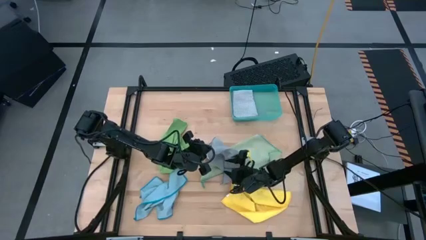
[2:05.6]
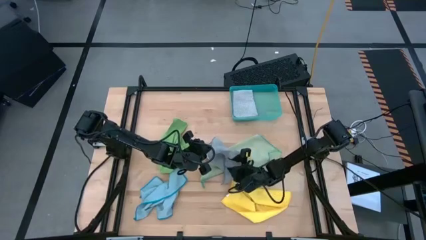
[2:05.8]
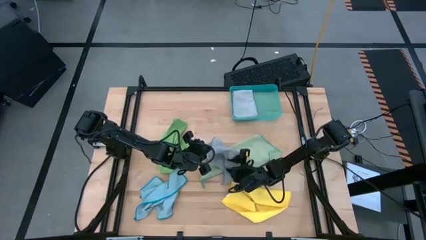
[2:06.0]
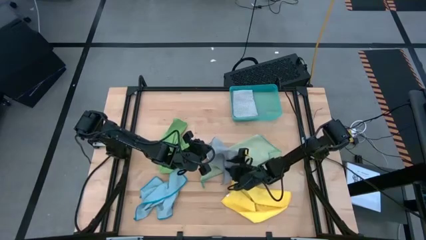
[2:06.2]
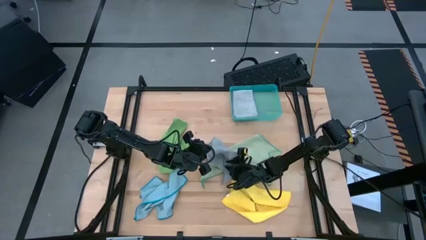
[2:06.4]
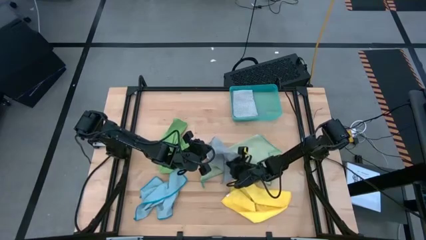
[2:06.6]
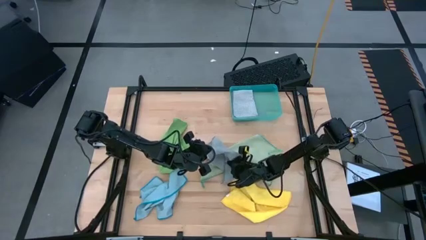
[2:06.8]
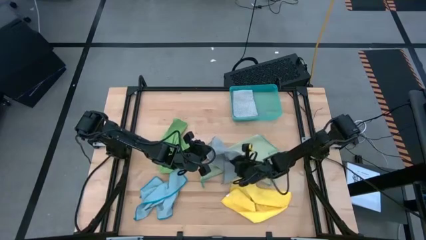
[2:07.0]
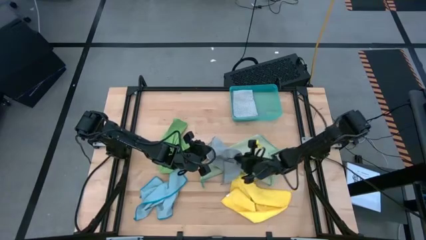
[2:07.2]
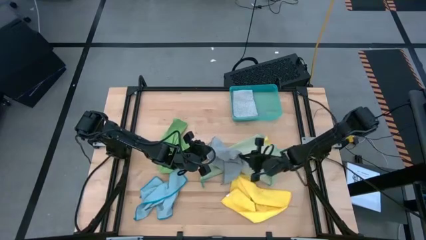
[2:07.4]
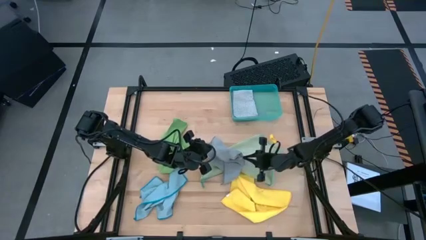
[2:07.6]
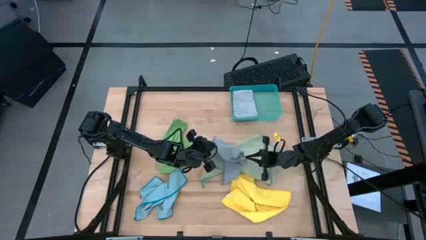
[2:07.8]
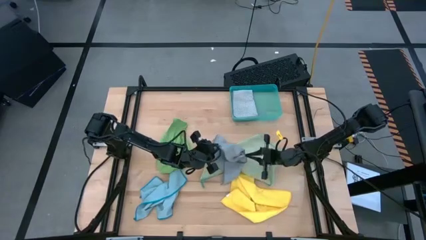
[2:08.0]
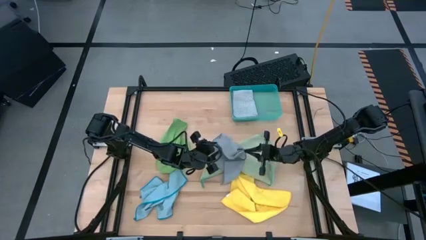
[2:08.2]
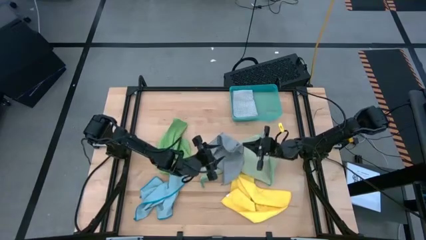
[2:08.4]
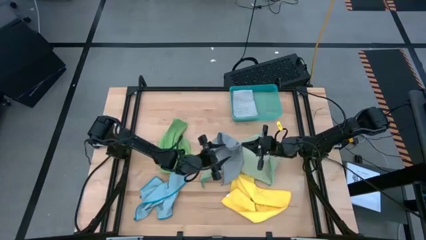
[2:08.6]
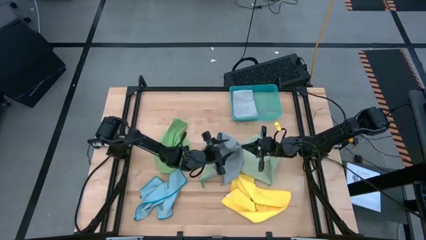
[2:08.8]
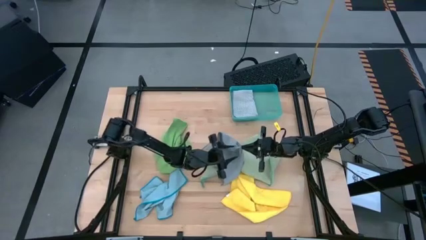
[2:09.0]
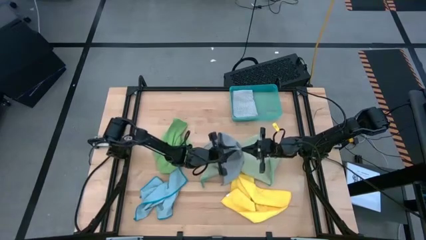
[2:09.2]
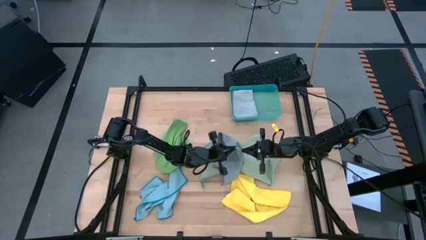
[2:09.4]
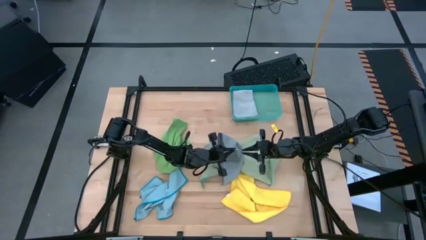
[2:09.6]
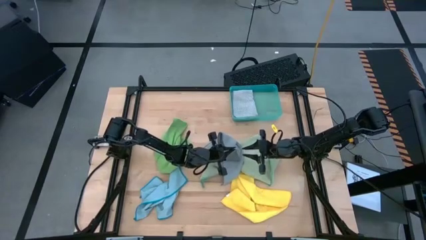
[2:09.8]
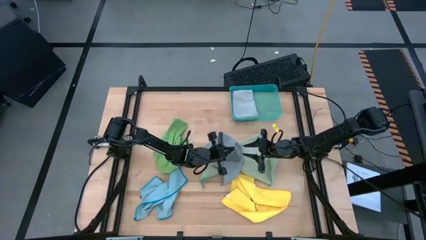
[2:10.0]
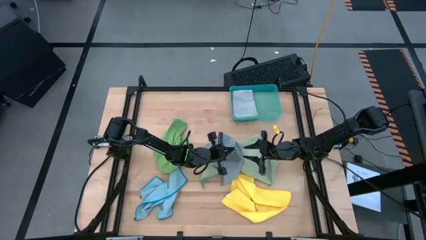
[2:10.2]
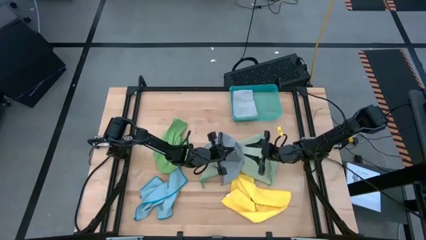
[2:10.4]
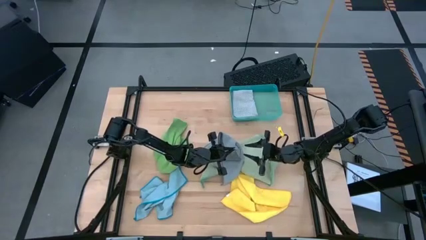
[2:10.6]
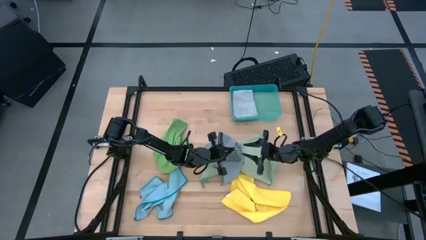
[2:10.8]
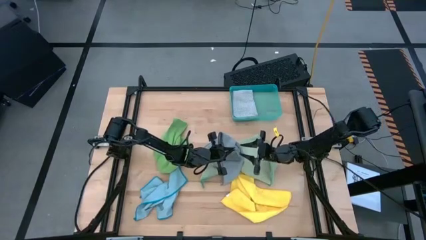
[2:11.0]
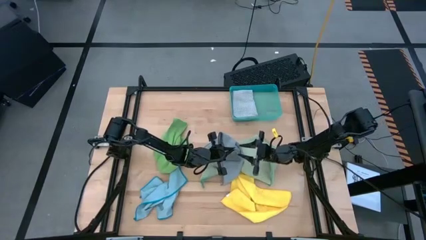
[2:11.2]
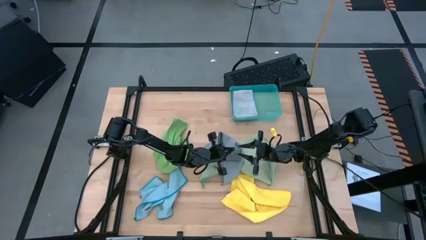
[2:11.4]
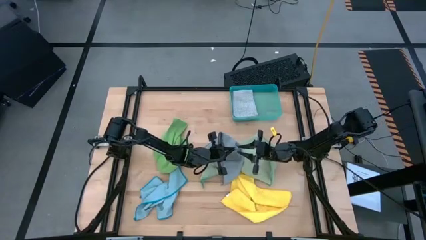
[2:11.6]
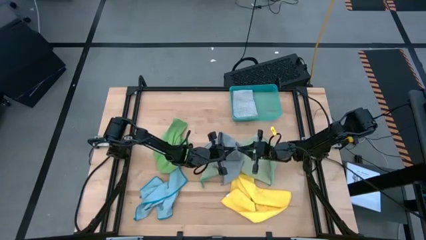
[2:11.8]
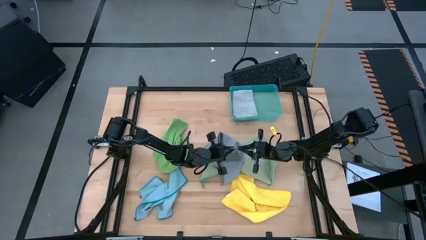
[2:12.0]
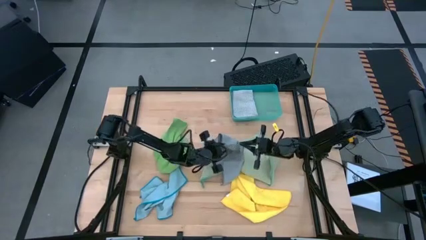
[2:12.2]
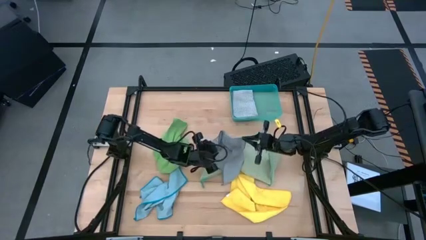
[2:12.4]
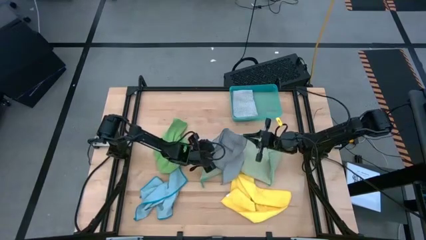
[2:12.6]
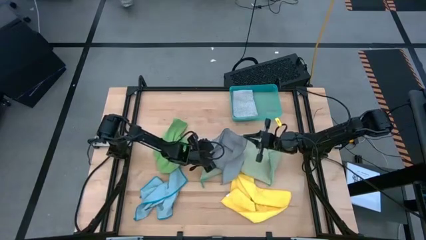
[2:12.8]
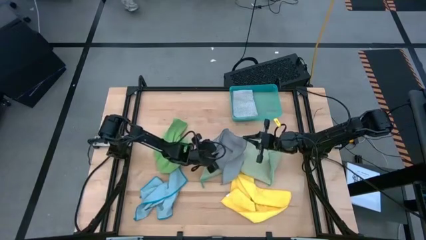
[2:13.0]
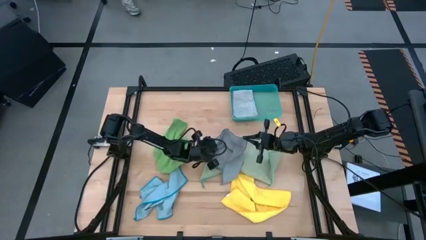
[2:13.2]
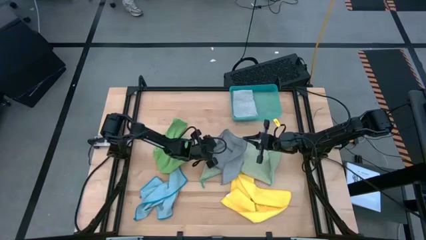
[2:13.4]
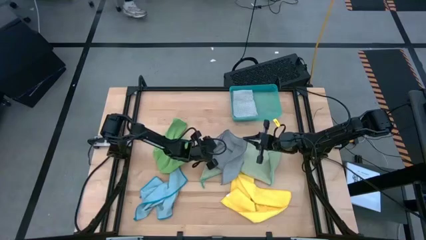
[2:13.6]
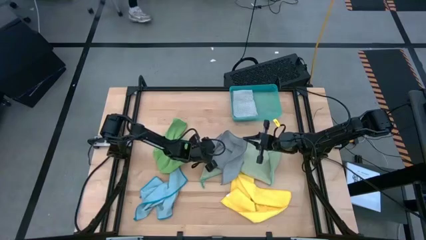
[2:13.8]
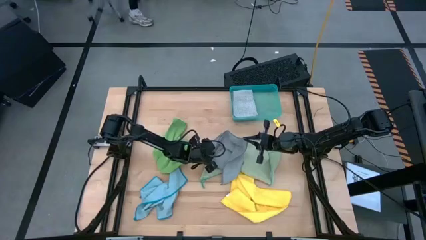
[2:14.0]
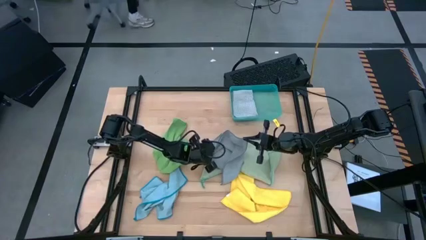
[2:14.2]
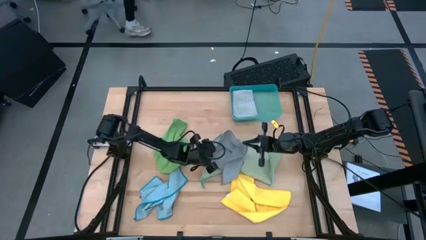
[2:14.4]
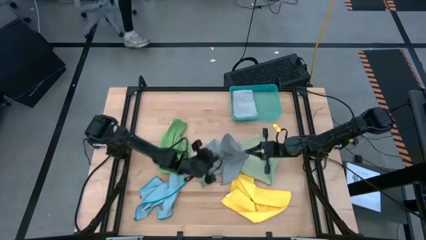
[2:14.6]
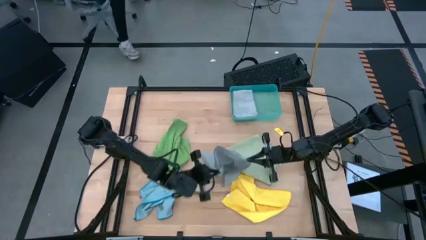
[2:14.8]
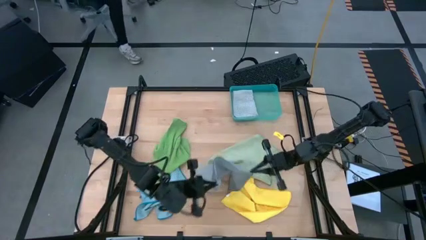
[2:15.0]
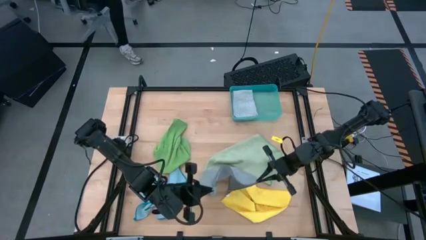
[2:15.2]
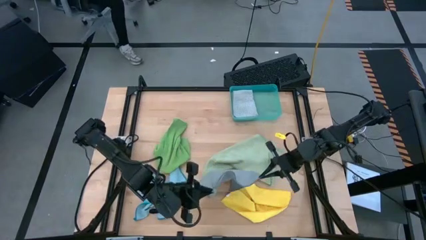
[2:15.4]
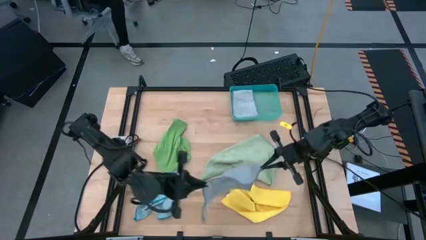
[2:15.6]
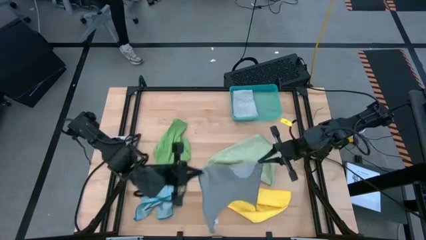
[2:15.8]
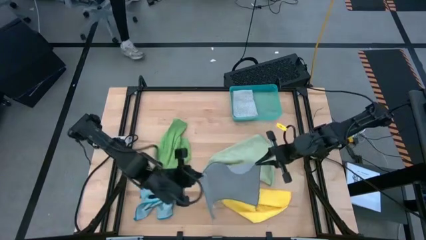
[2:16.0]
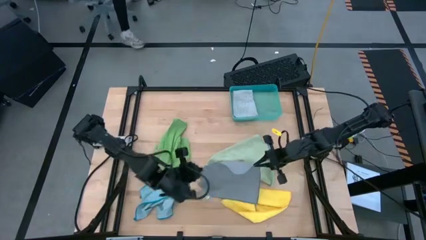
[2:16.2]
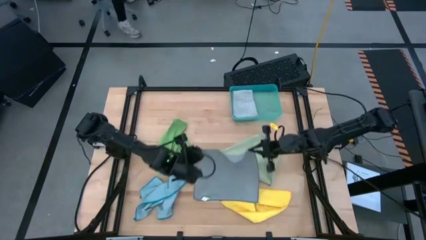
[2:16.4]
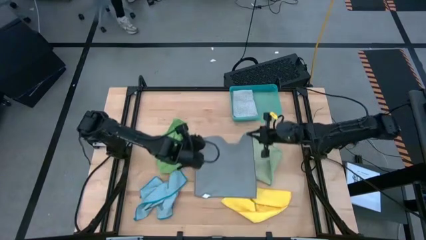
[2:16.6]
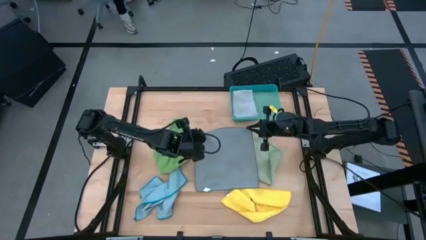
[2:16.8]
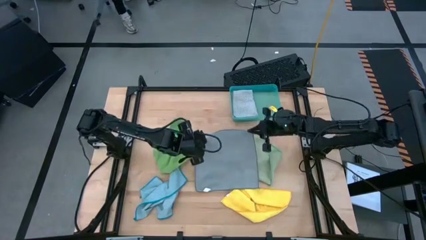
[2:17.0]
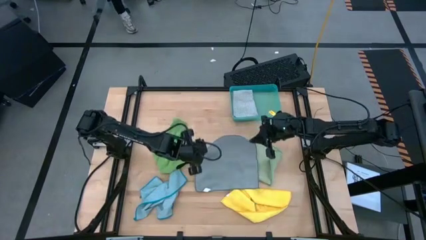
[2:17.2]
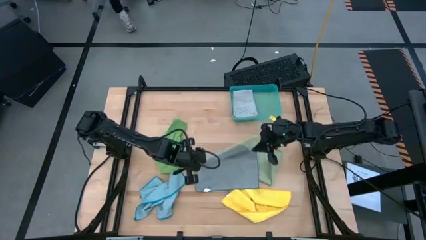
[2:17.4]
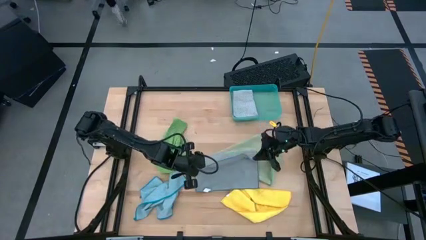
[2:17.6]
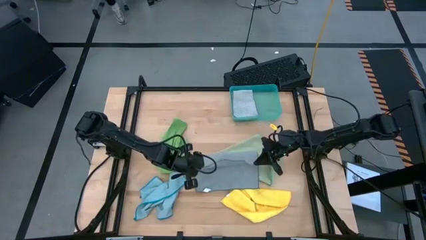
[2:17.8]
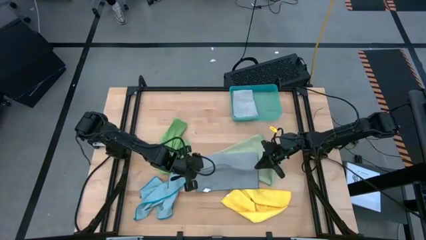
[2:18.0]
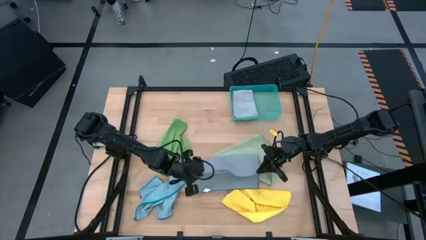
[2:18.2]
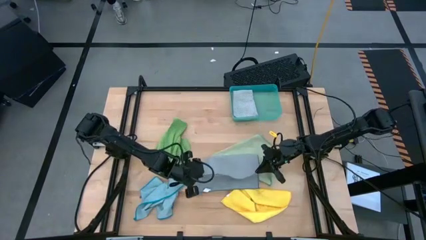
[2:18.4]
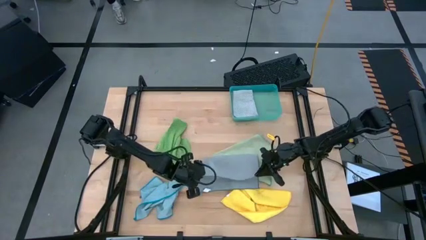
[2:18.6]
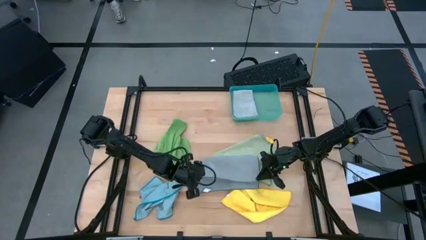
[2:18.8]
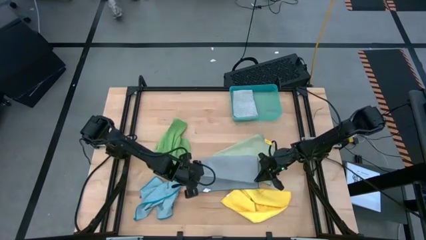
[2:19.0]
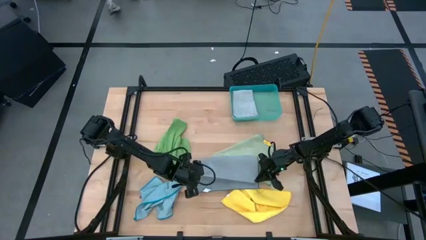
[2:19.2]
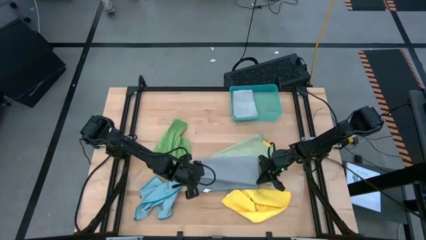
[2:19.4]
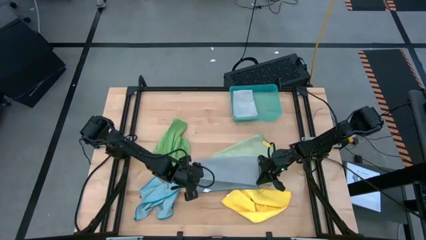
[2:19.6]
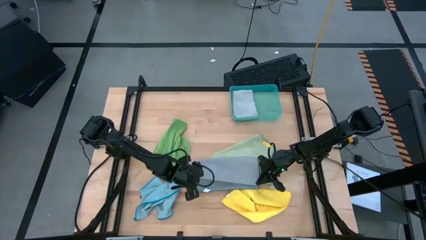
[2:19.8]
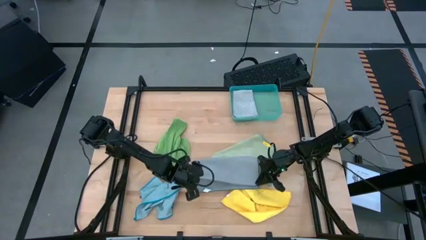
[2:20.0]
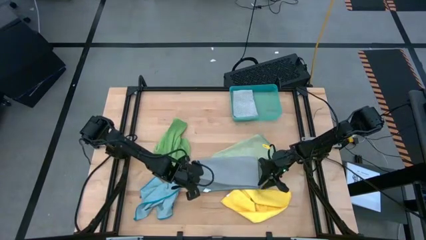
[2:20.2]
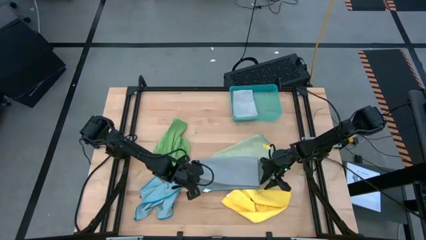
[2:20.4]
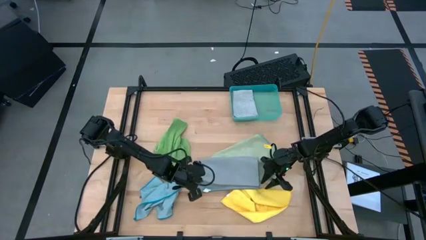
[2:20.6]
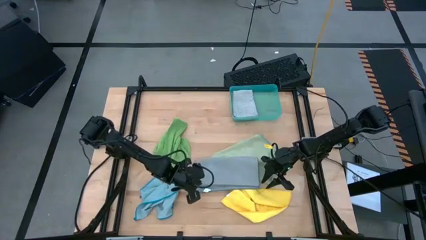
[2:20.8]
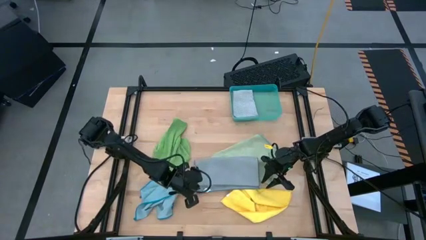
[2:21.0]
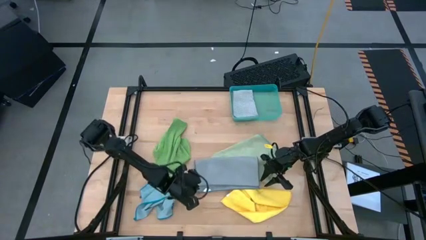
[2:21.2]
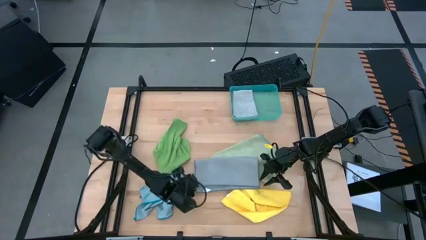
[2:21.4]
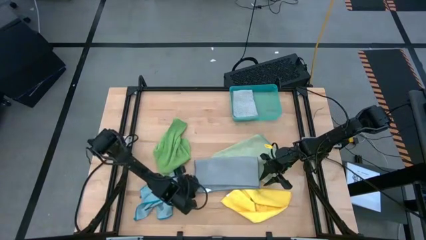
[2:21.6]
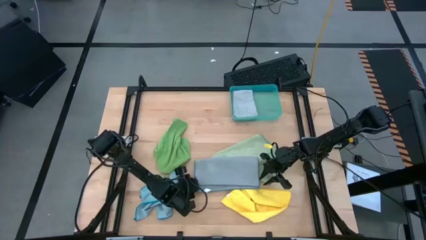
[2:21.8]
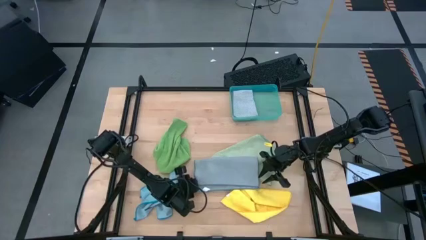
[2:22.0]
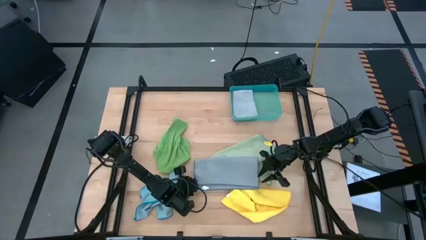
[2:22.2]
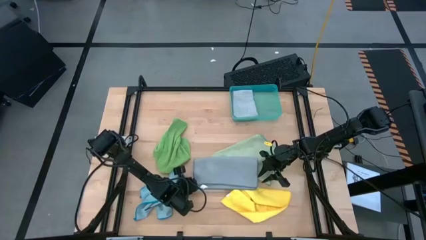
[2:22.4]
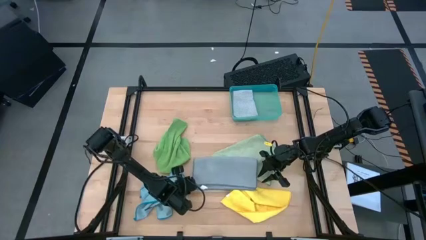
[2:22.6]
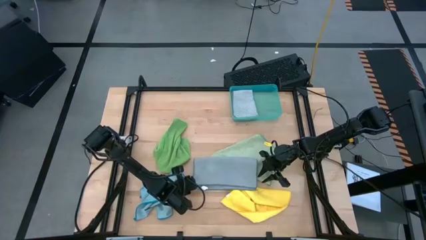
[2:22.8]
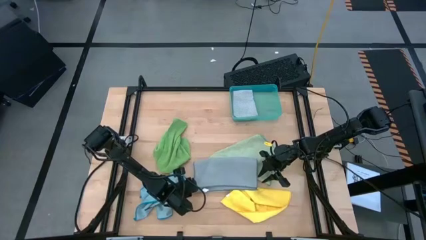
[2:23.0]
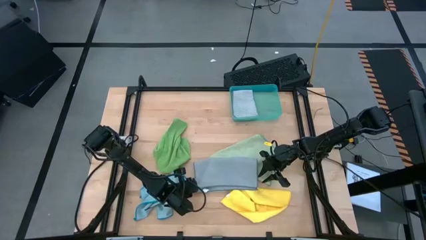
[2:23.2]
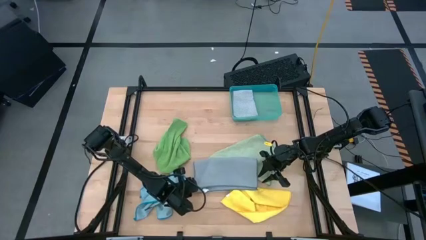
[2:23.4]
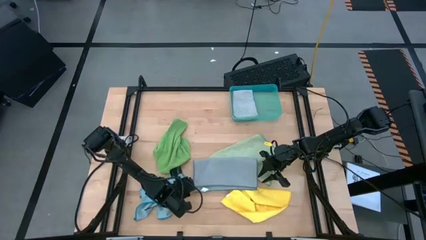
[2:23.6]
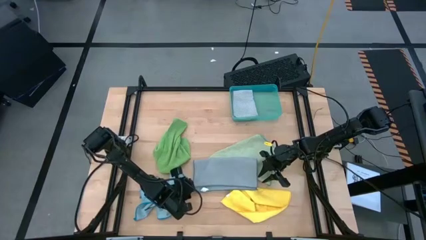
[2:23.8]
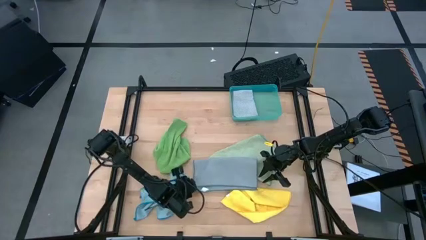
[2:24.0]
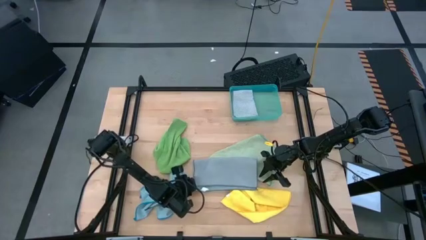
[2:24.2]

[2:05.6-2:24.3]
Task: Fold microfiber towels
Fold the gray microfiber cloth
